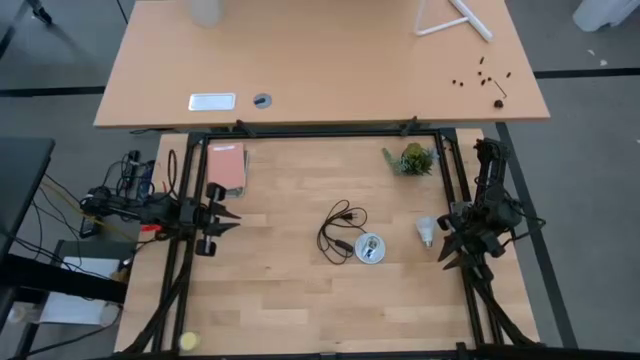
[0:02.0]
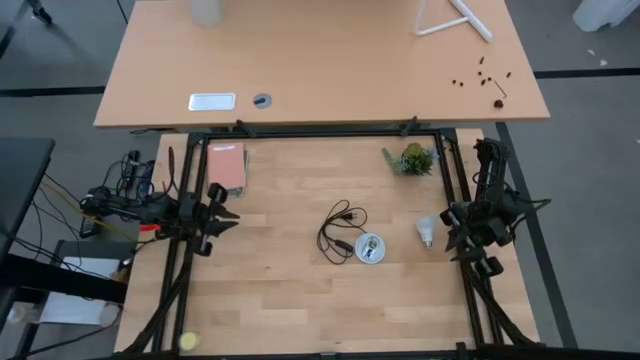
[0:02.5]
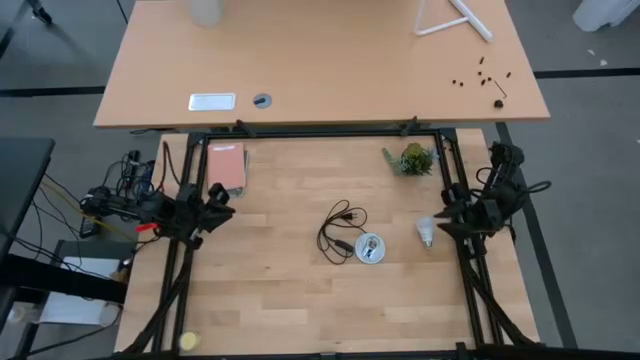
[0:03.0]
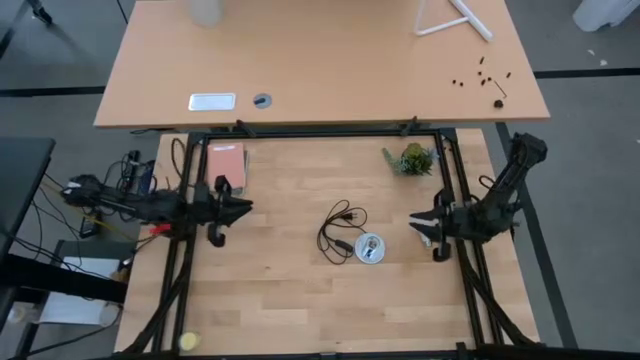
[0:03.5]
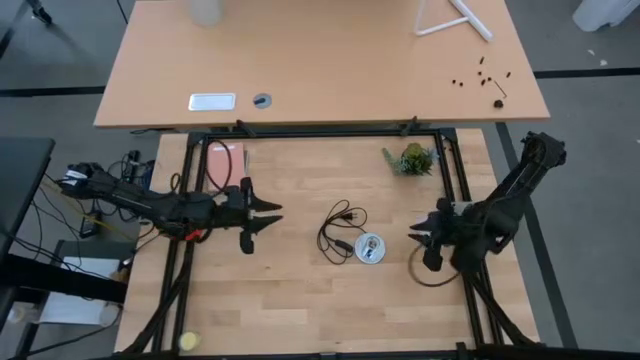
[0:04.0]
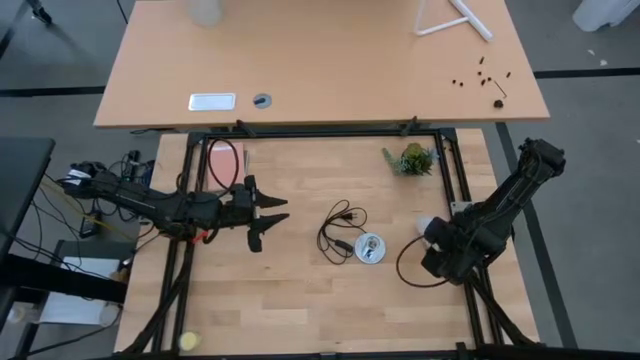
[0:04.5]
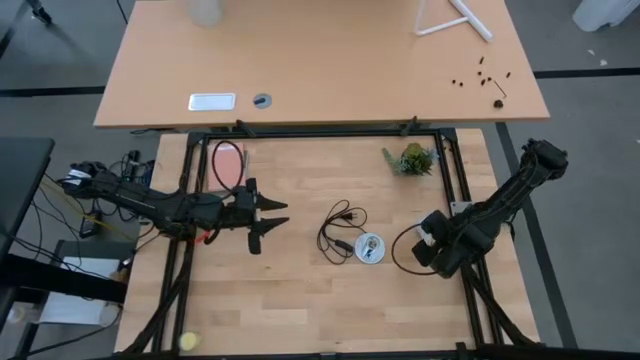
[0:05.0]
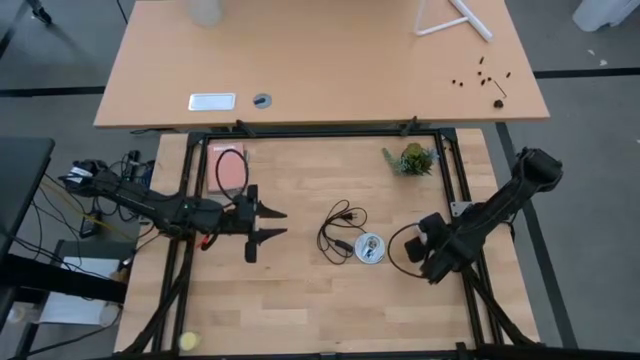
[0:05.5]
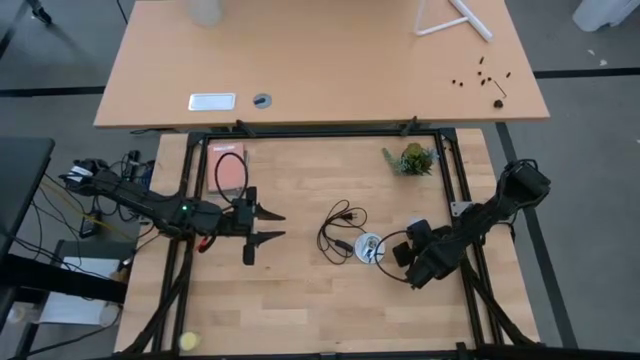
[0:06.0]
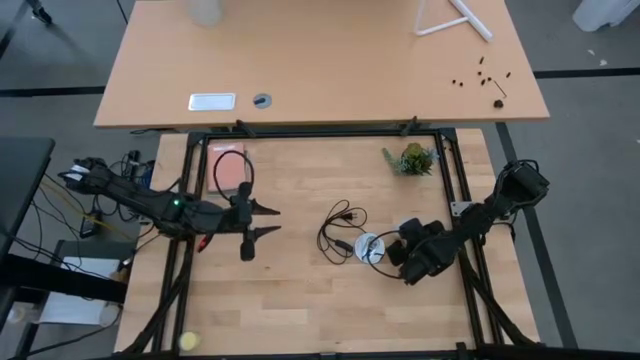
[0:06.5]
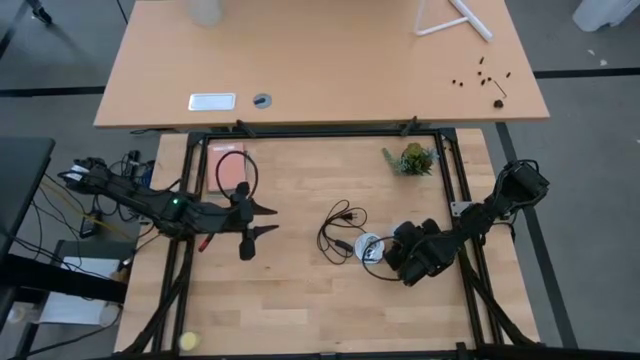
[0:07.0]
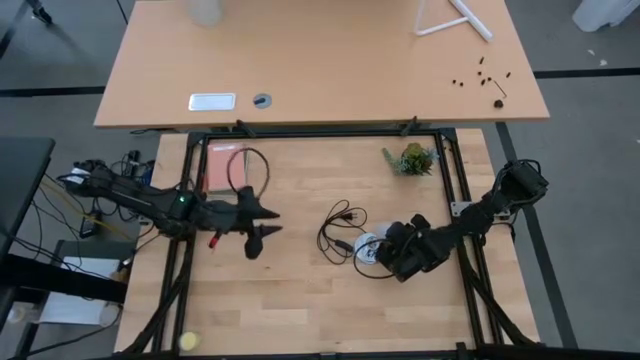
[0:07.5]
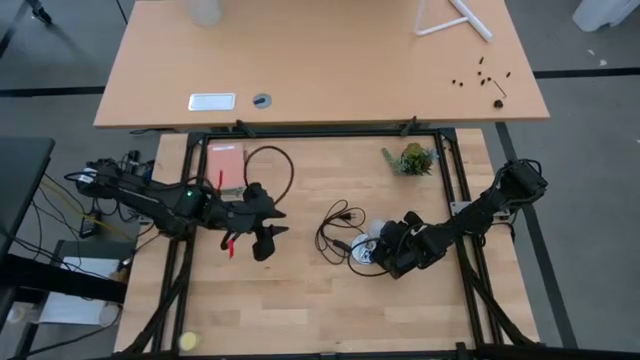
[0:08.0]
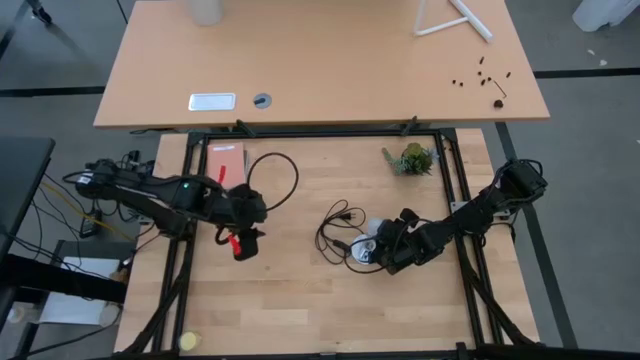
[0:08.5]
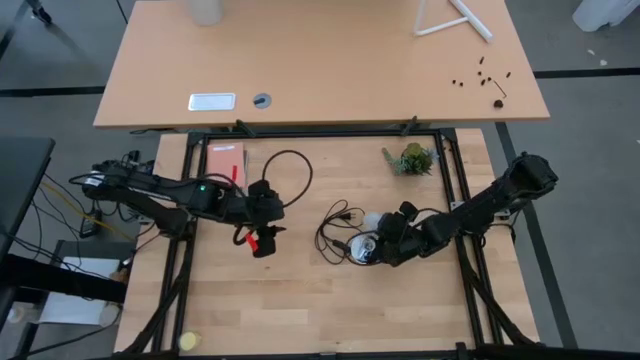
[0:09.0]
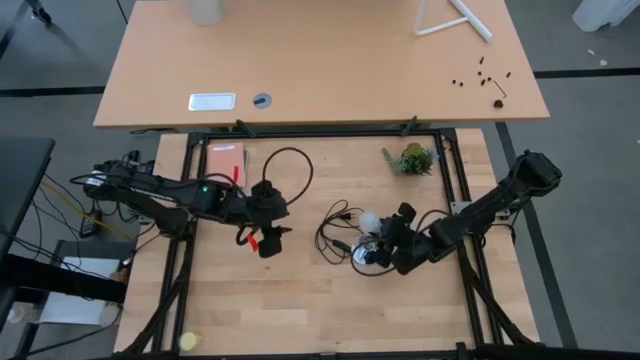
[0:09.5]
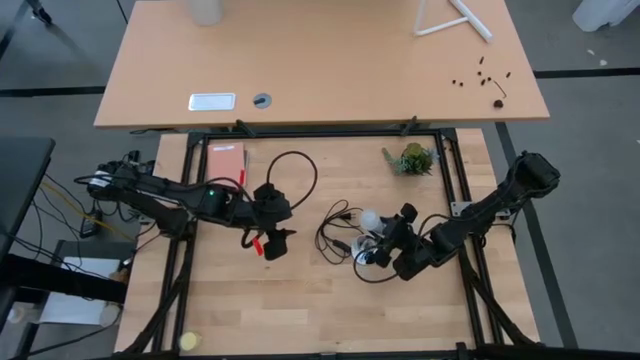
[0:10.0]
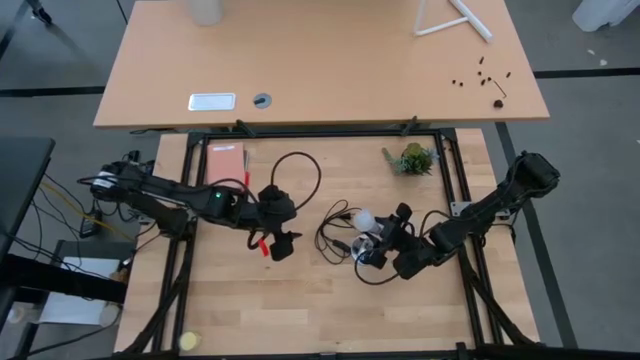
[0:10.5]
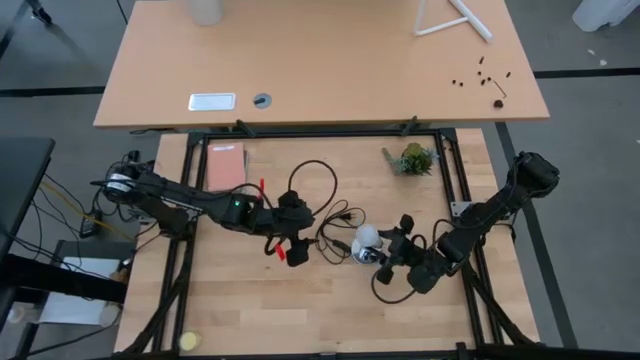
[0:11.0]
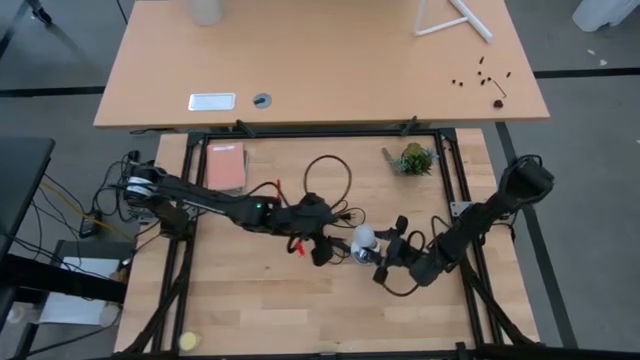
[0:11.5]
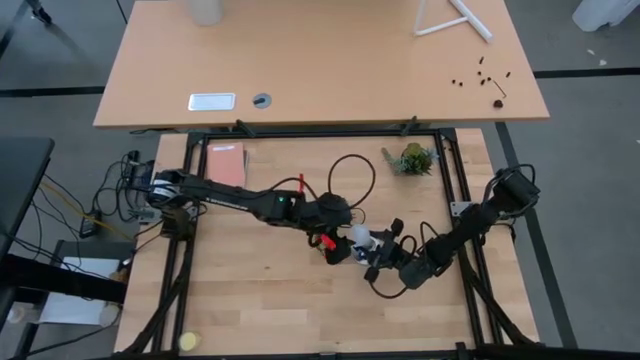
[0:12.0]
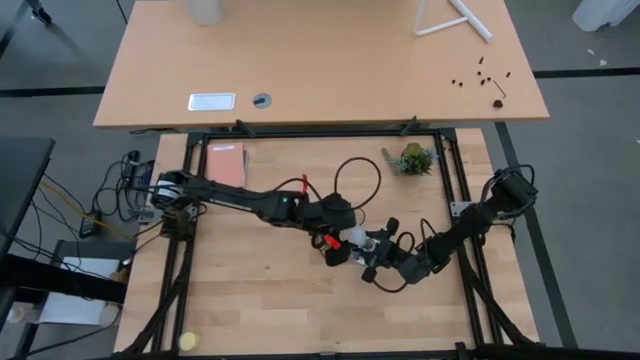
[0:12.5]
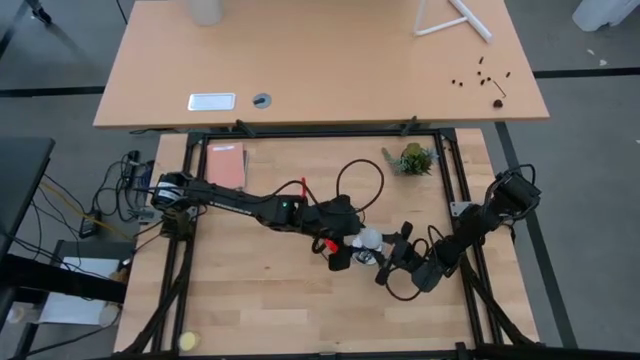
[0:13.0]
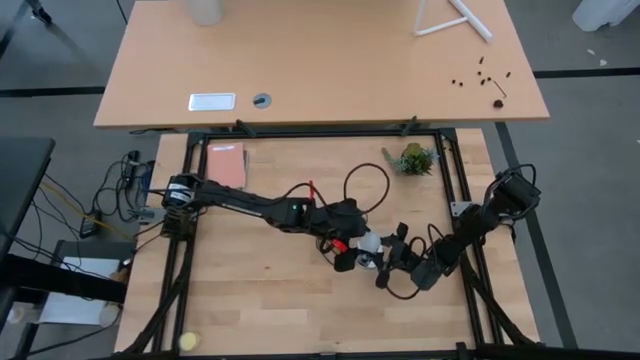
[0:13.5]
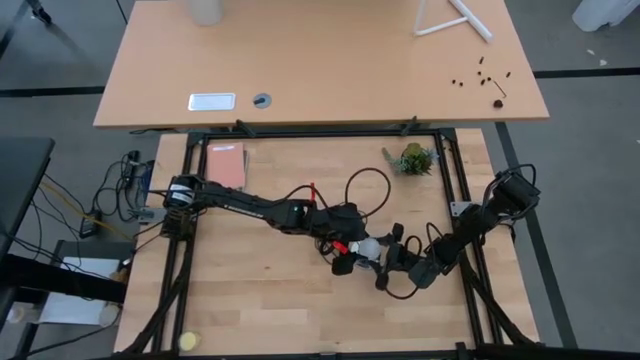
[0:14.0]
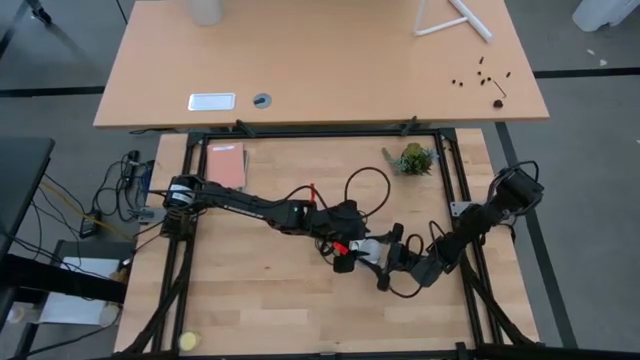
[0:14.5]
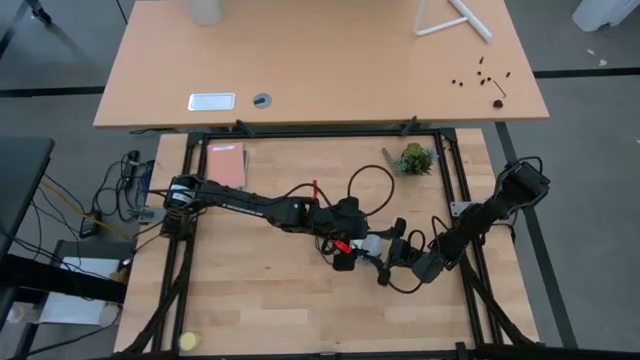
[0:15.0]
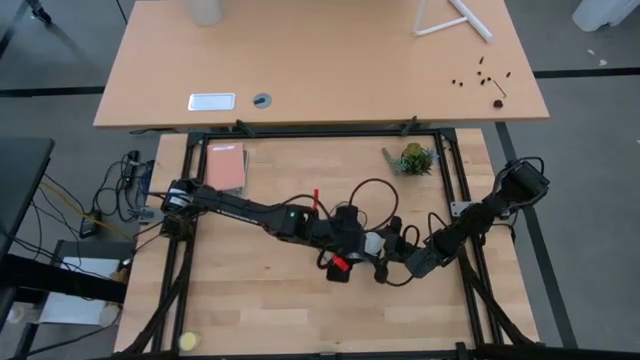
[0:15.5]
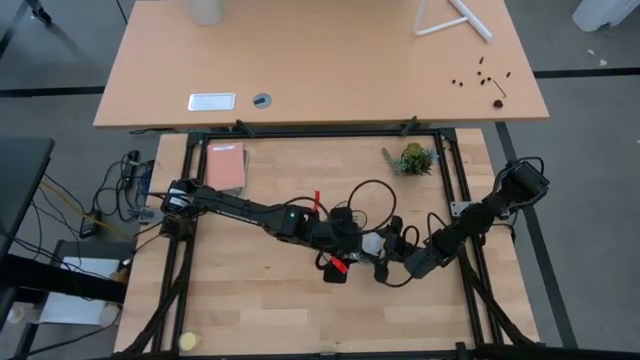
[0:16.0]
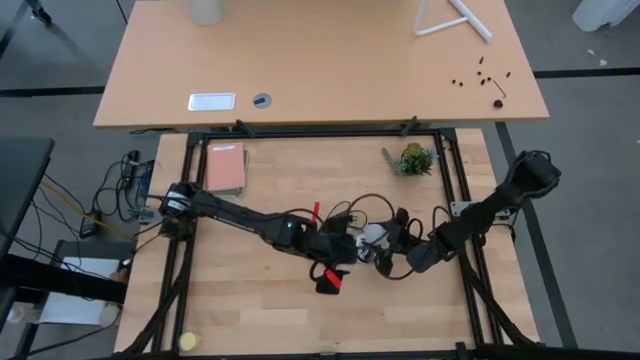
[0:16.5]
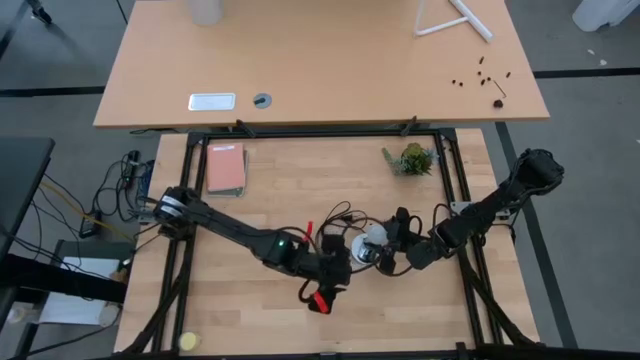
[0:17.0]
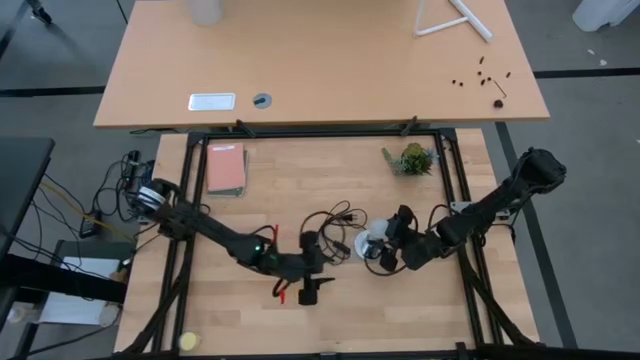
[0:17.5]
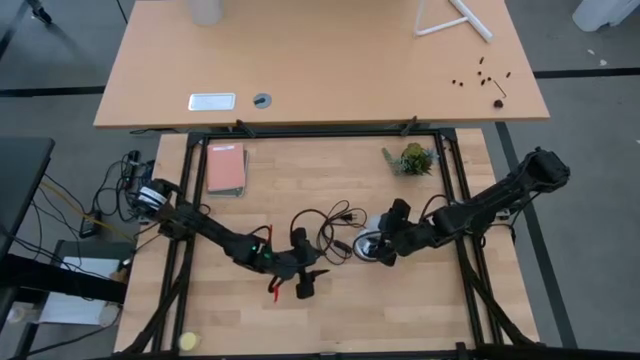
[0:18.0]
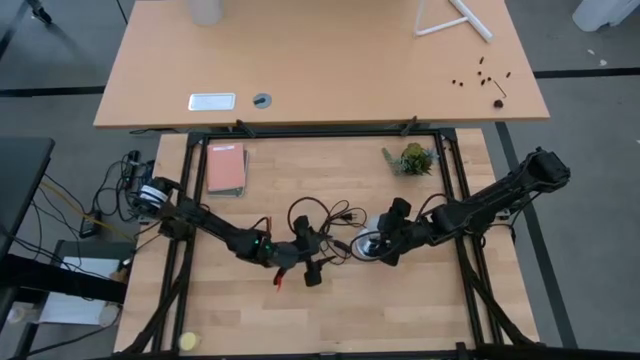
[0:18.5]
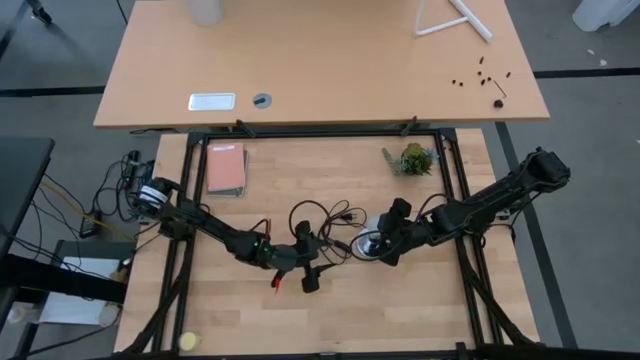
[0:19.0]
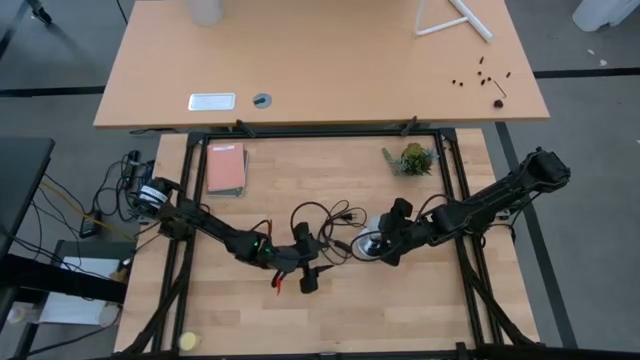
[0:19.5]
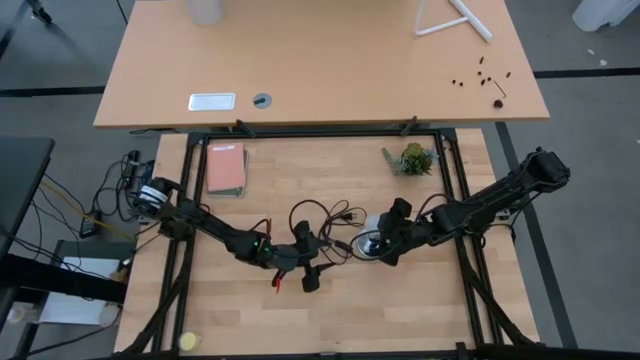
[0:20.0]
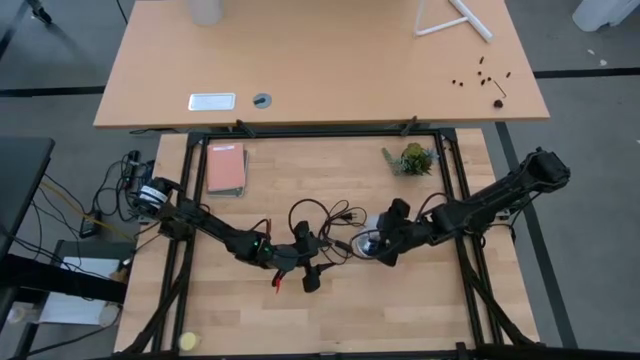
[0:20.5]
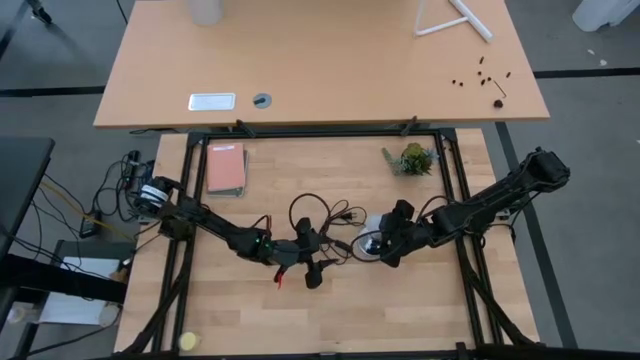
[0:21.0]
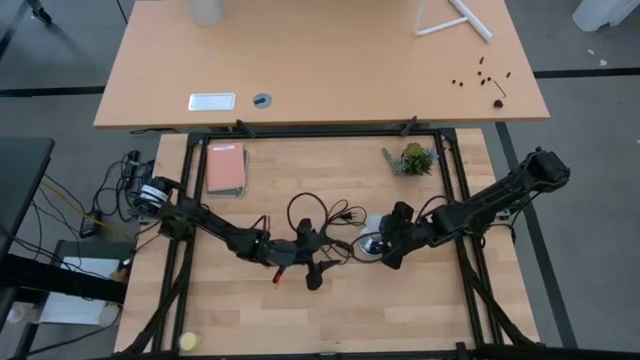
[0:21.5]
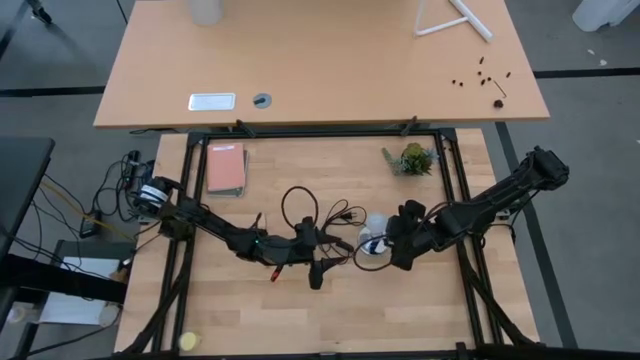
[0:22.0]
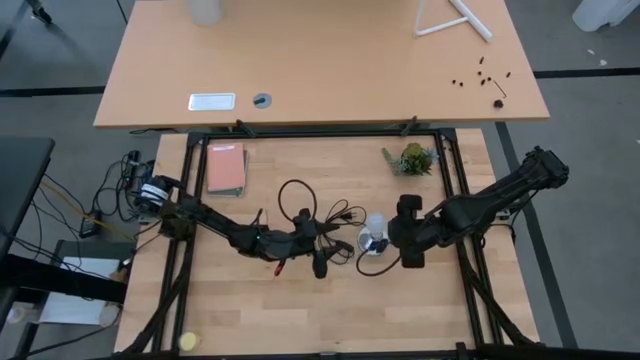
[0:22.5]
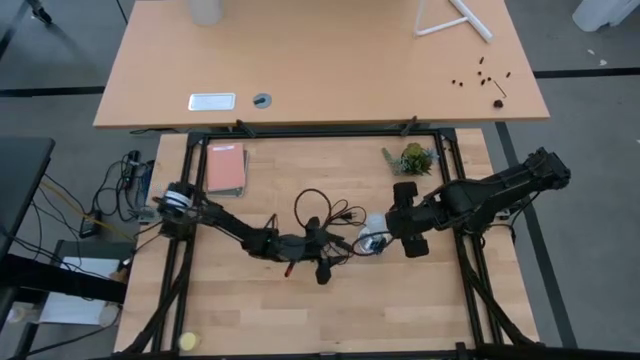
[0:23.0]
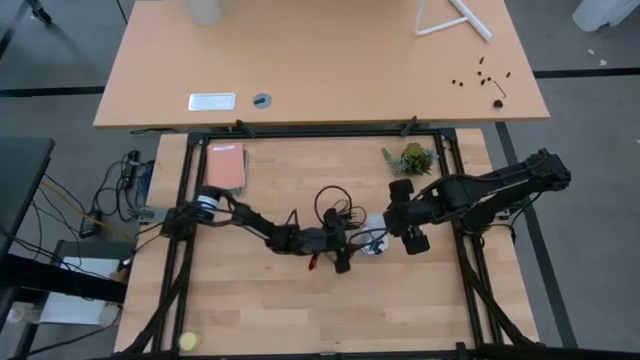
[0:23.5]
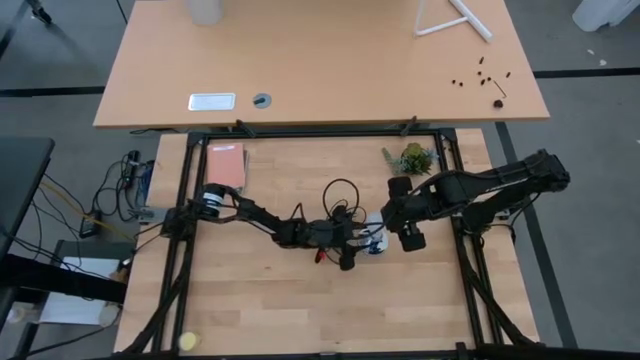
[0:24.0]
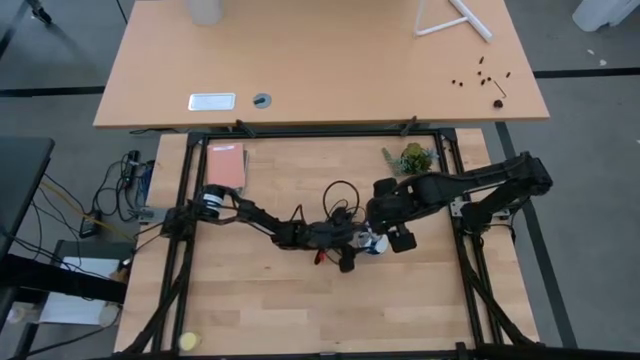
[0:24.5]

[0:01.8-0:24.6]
Task: Screw lightbulb
Insert the lightbulb into the lamp
